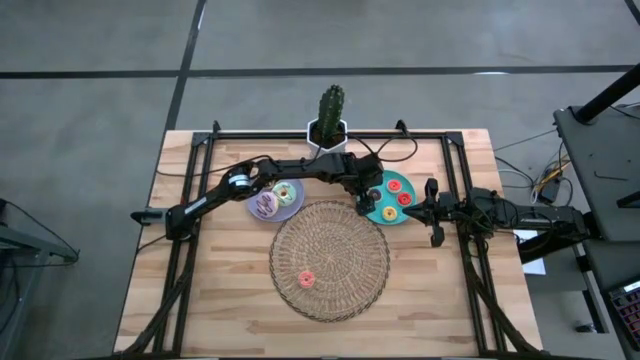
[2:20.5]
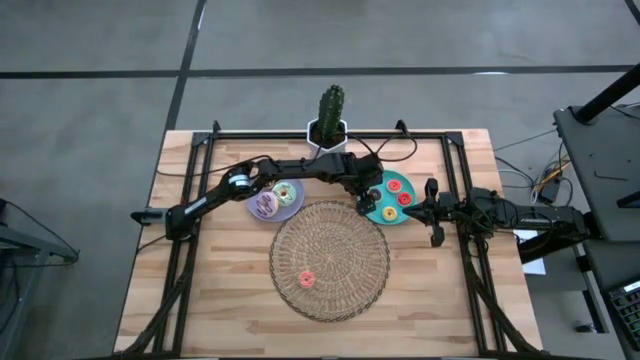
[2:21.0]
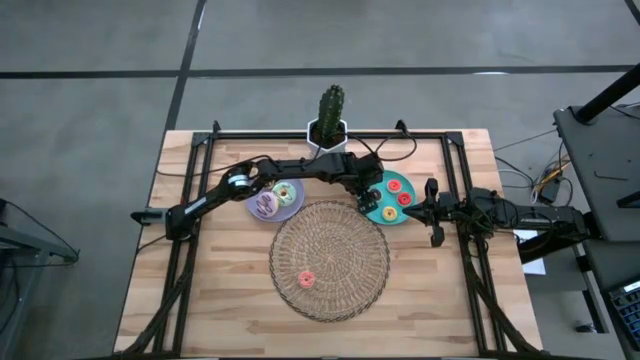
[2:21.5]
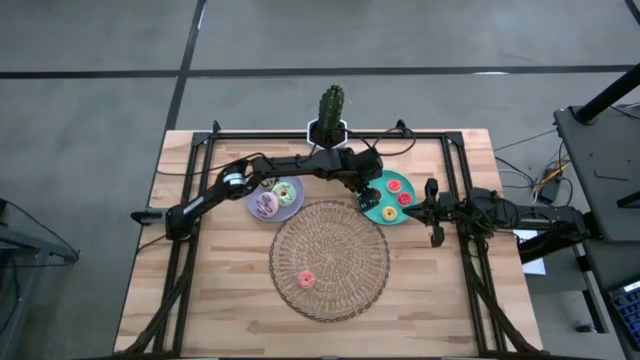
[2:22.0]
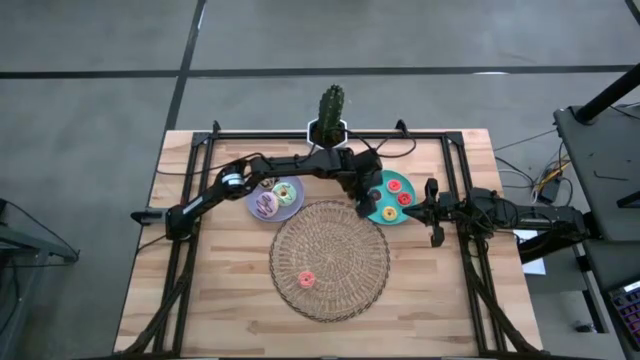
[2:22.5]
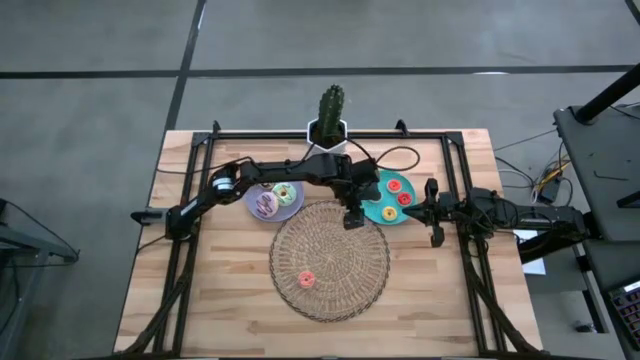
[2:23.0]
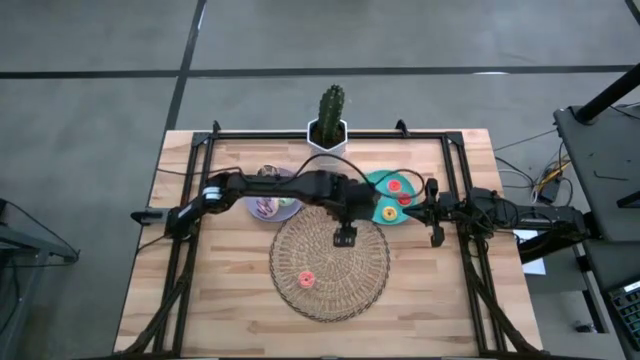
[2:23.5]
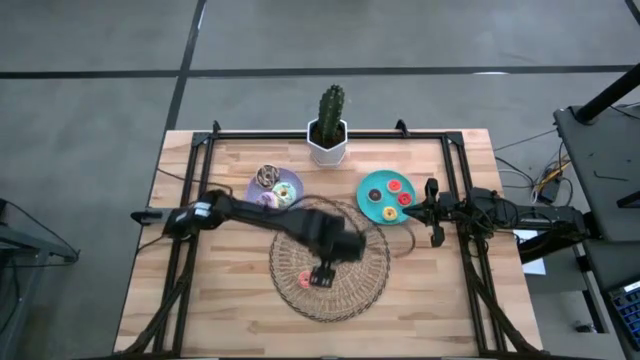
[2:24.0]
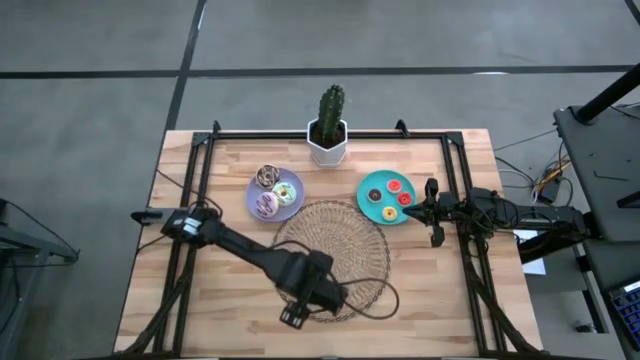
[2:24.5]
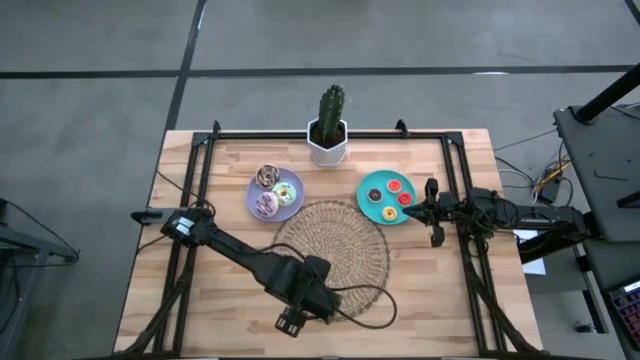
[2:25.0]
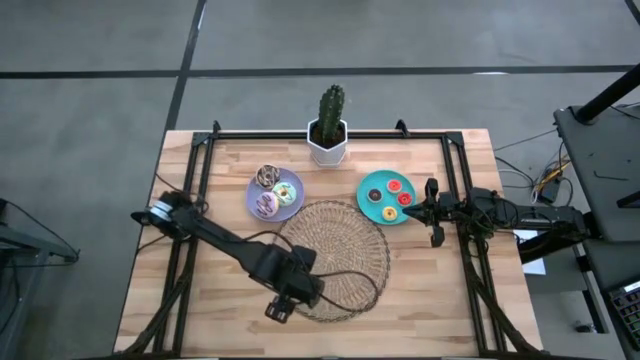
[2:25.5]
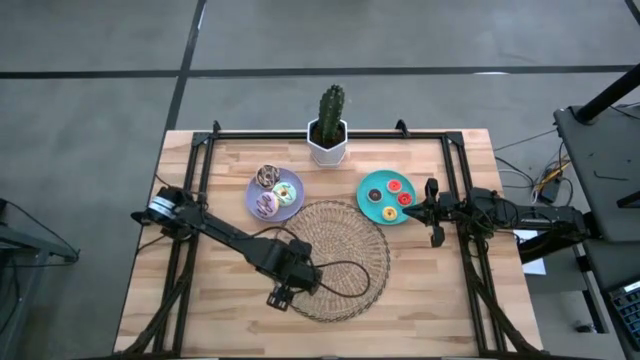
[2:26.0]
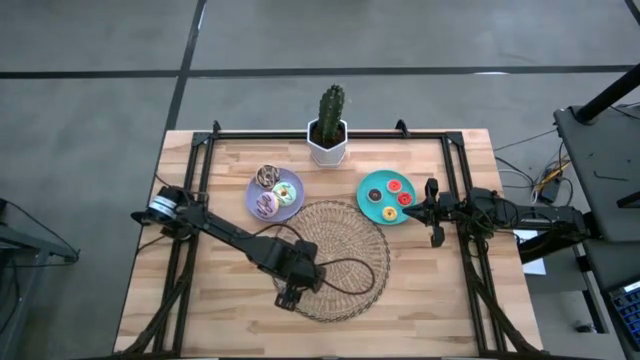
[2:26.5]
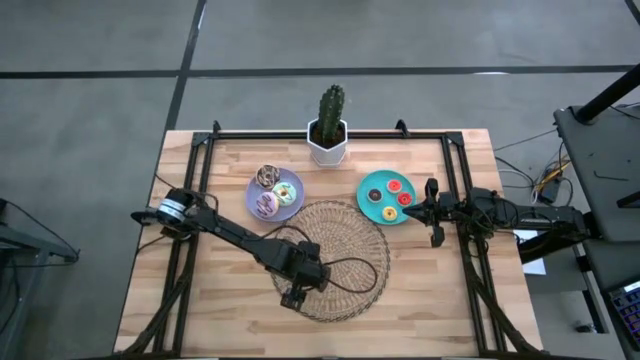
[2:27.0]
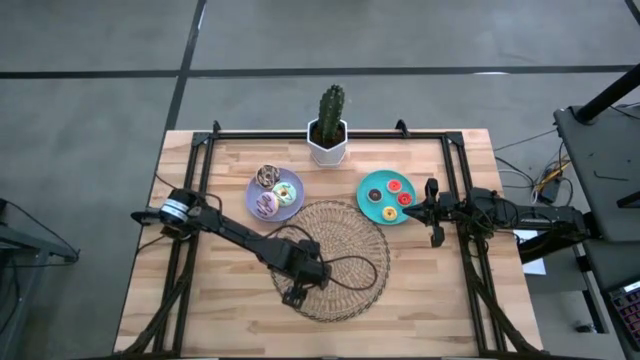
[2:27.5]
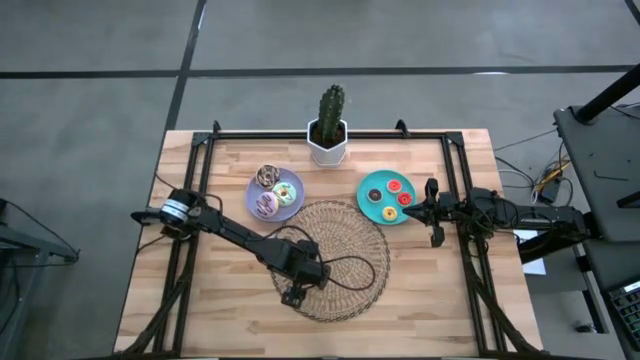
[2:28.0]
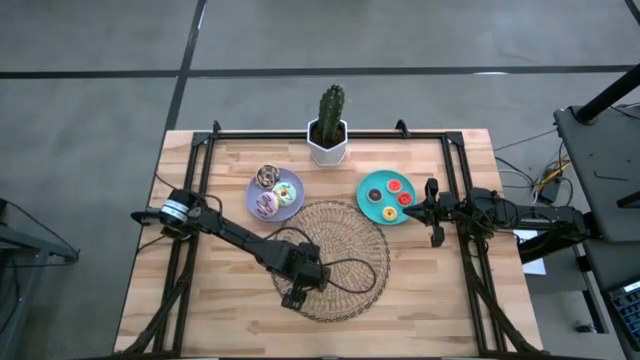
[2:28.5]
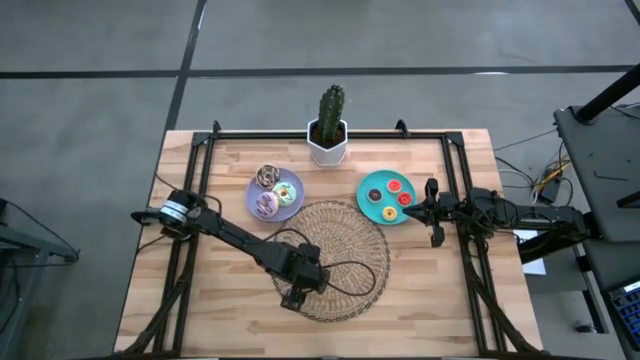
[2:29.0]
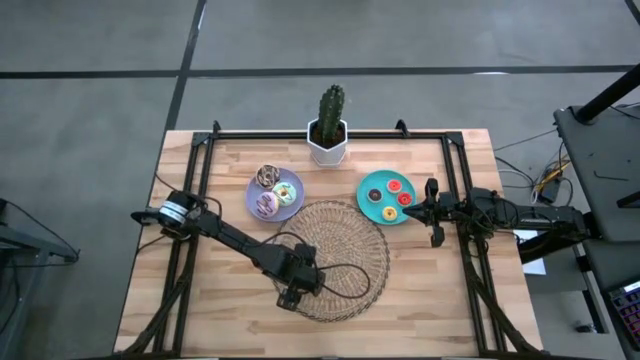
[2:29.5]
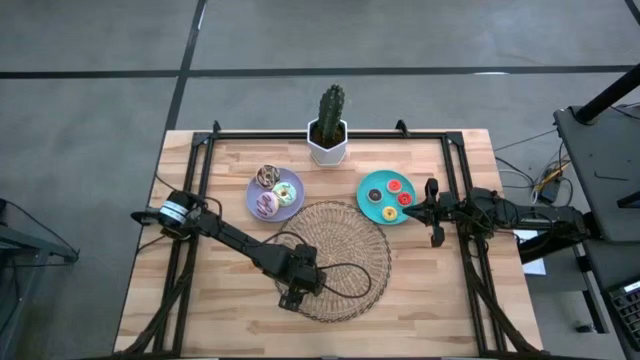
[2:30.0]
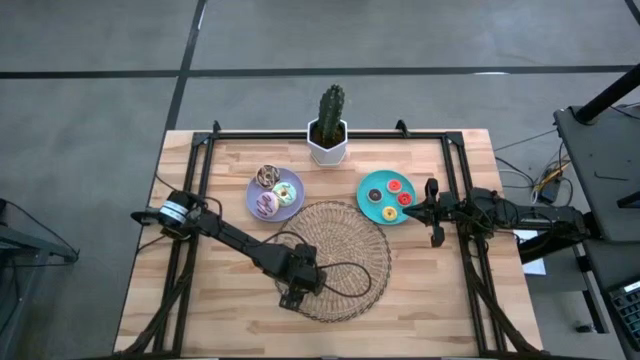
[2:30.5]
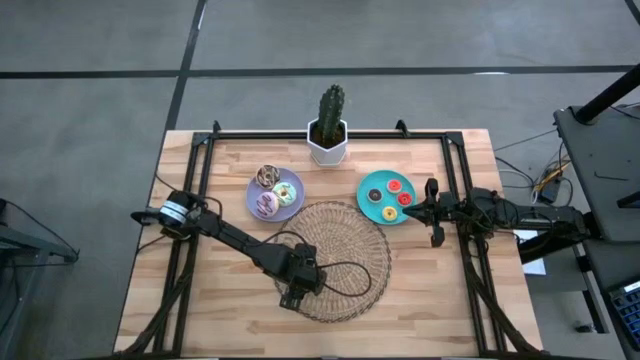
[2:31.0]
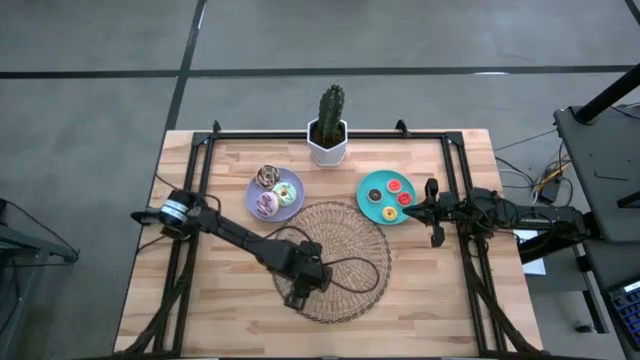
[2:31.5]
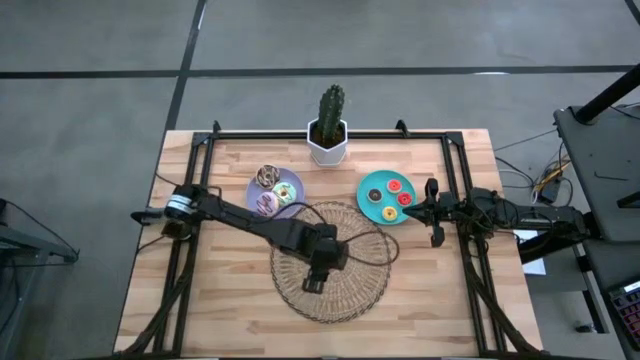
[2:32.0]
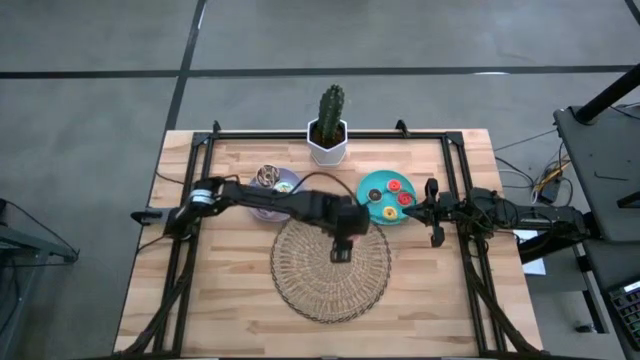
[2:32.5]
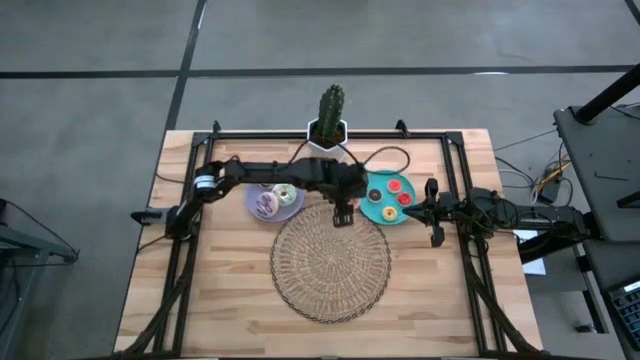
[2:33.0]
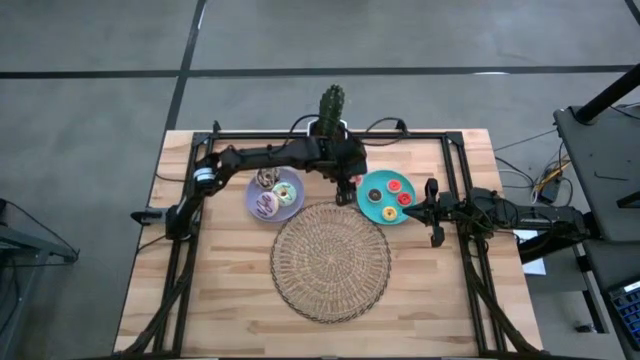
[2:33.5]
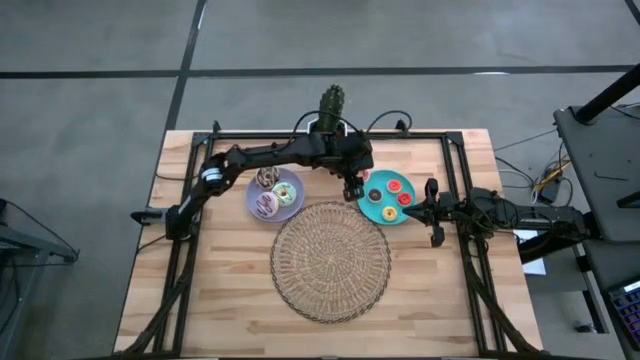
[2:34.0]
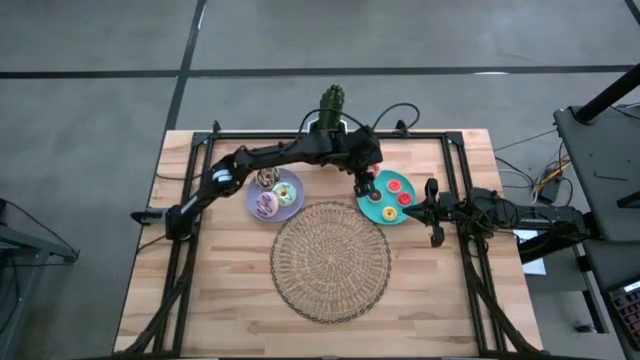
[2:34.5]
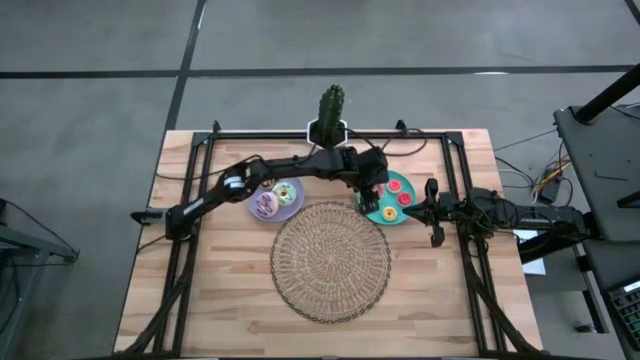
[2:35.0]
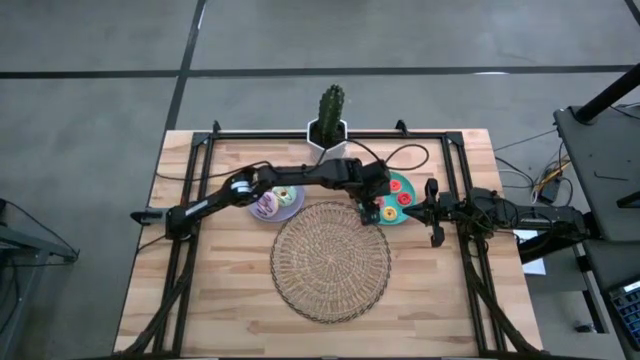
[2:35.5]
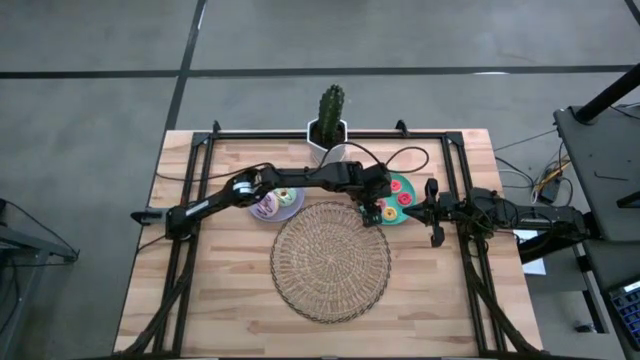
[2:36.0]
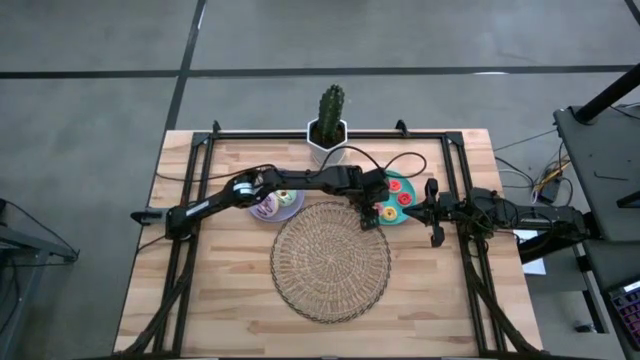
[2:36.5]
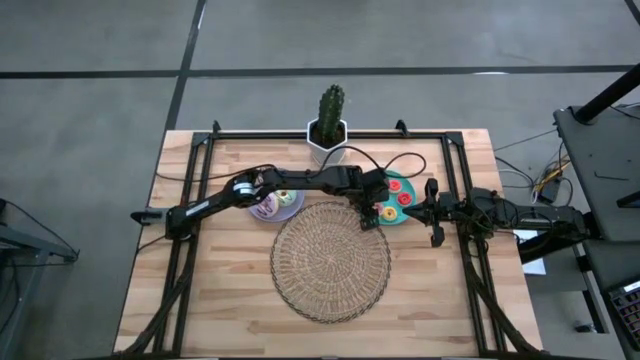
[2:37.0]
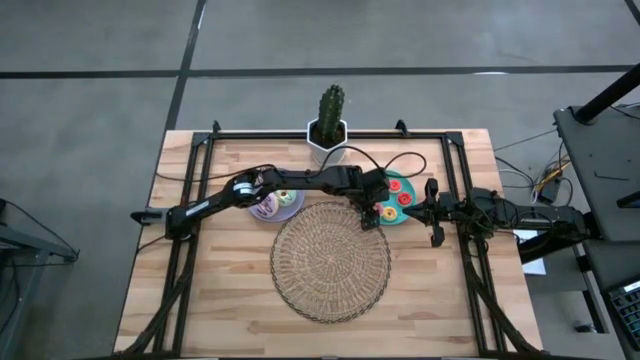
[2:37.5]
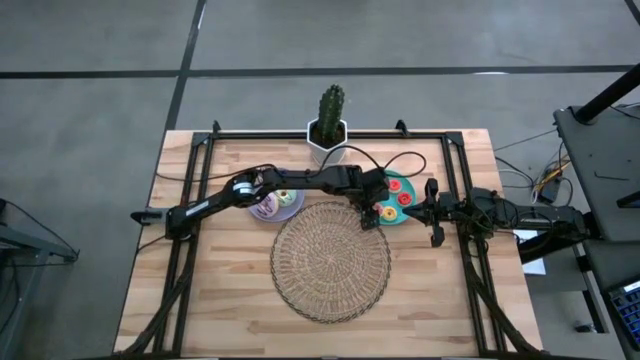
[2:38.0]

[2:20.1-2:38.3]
Task: Pick & Place donuts
Put the small pink donut on the blue plate
